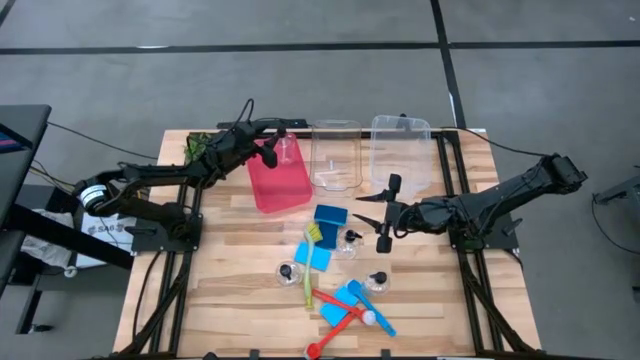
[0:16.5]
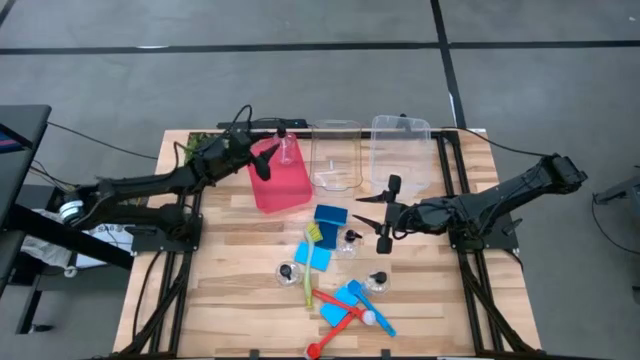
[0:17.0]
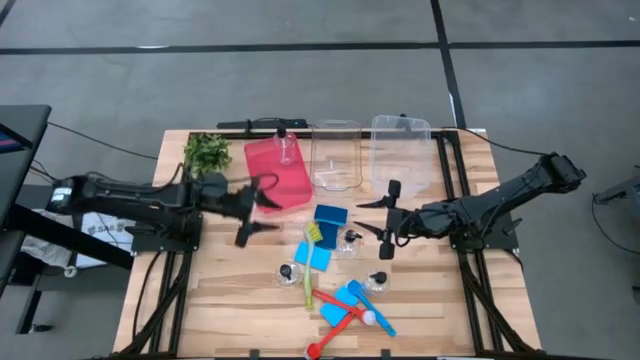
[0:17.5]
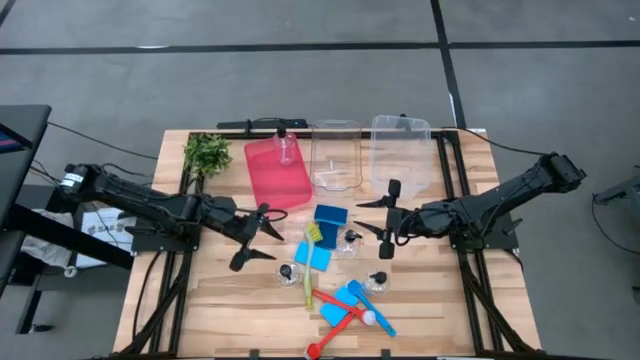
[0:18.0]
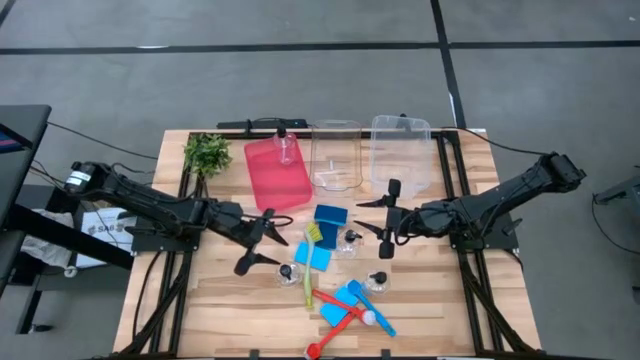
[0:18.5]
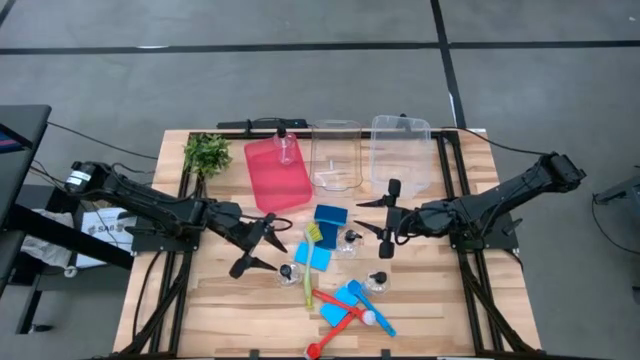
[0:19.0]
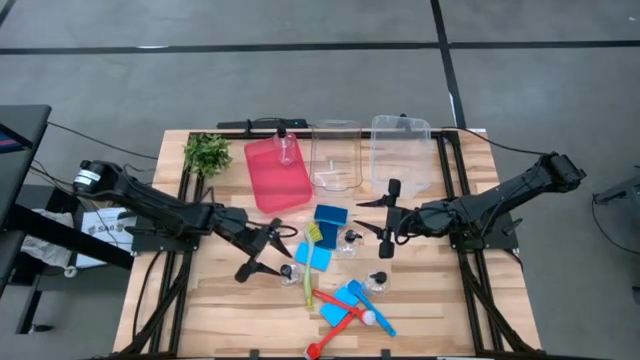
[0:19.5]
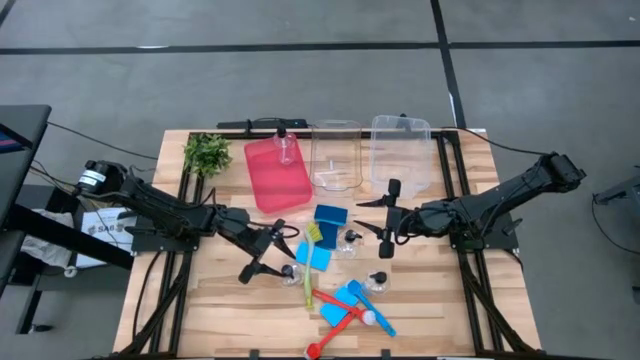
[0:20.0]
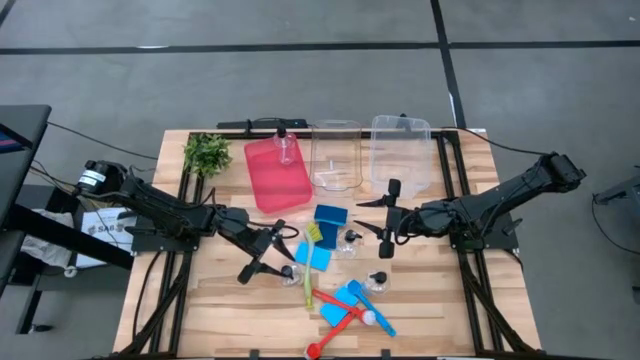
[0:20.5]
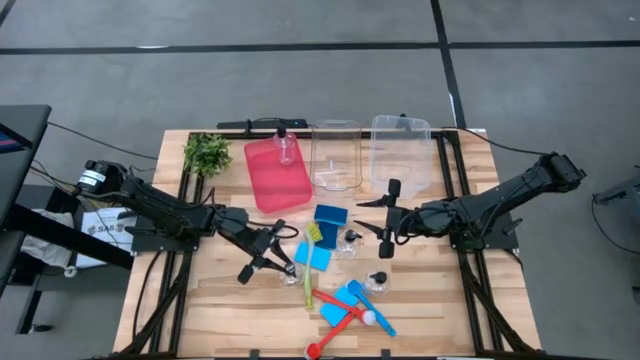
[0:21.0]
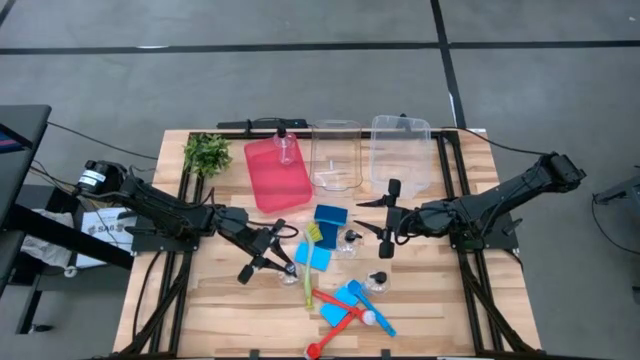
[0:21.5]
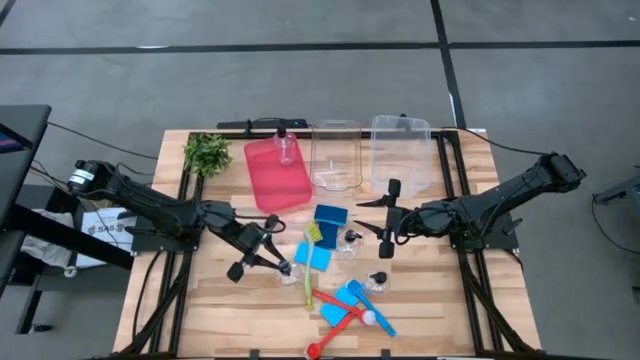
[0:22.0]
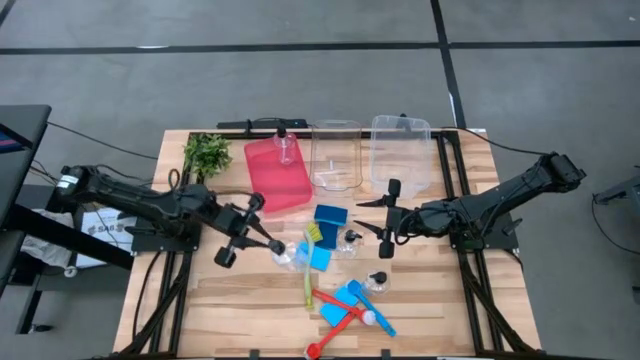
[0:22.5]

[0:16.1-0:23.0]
Task: Pick & Place Kitchen Sink Supplies
Put the transparent soap dispenser into the red bin

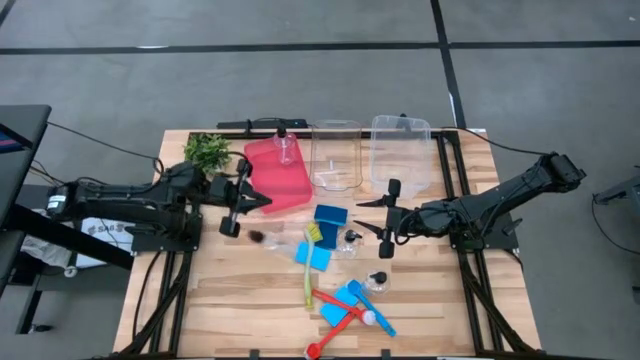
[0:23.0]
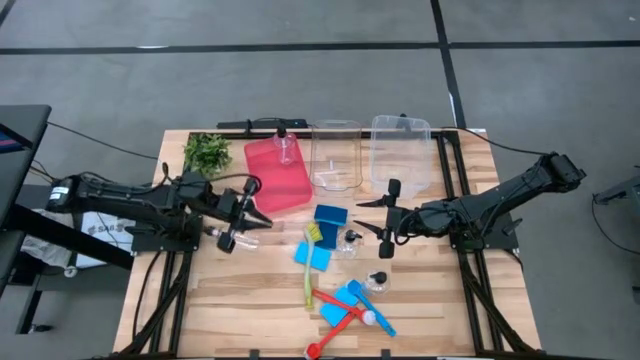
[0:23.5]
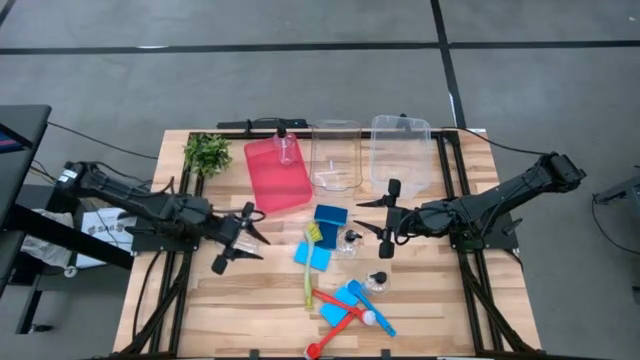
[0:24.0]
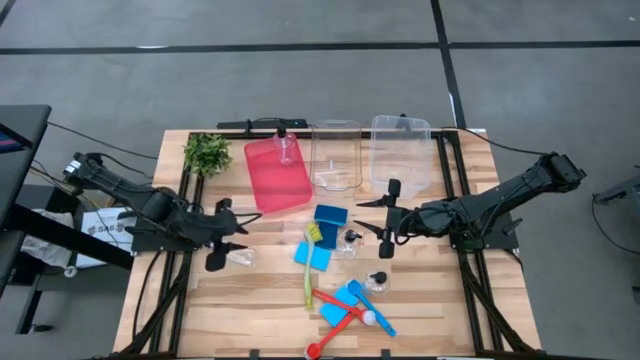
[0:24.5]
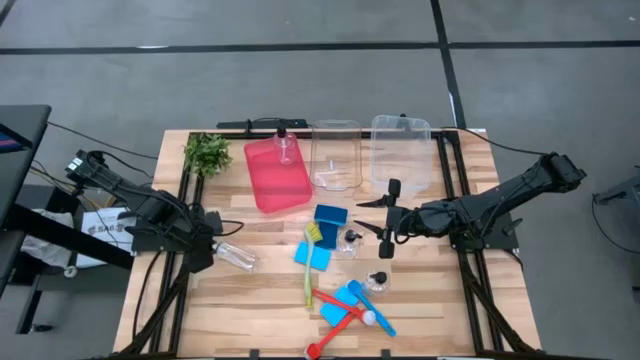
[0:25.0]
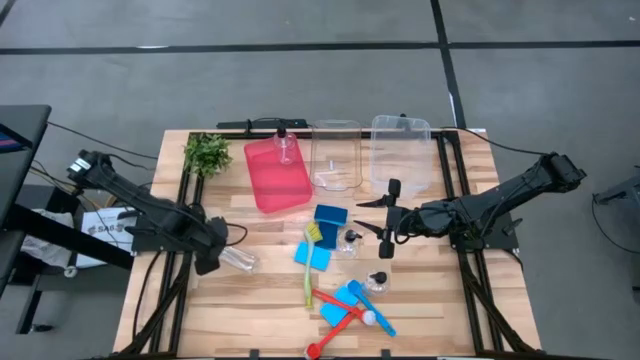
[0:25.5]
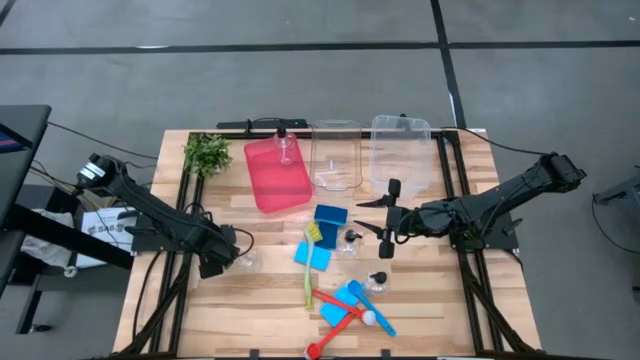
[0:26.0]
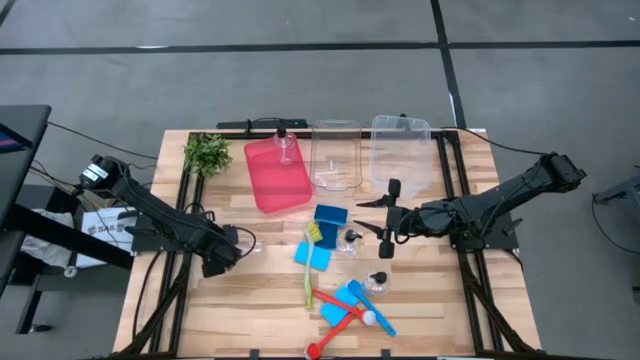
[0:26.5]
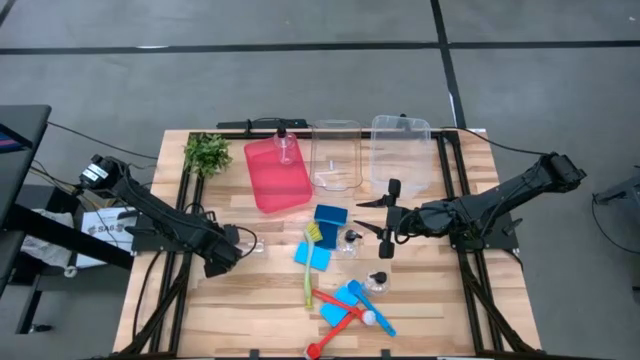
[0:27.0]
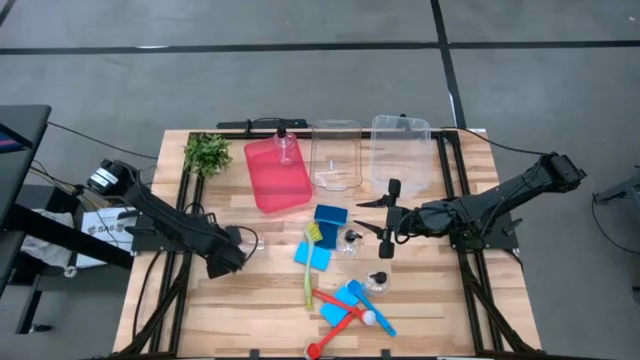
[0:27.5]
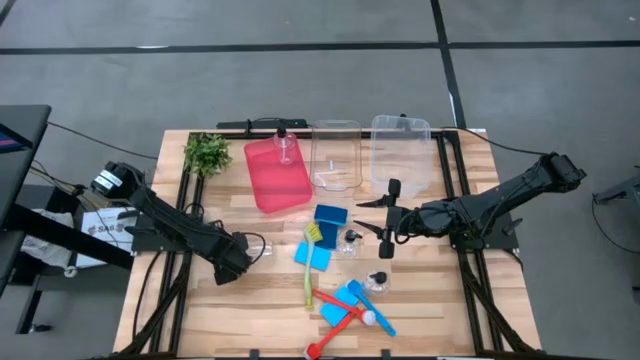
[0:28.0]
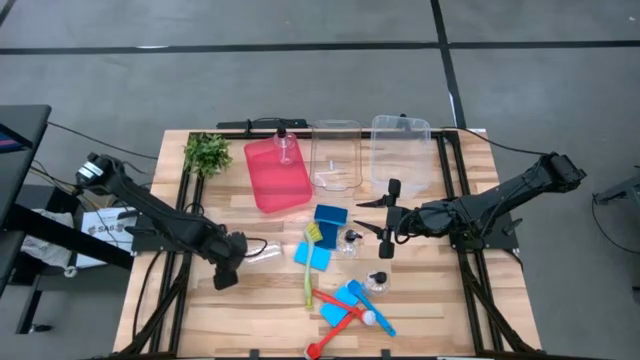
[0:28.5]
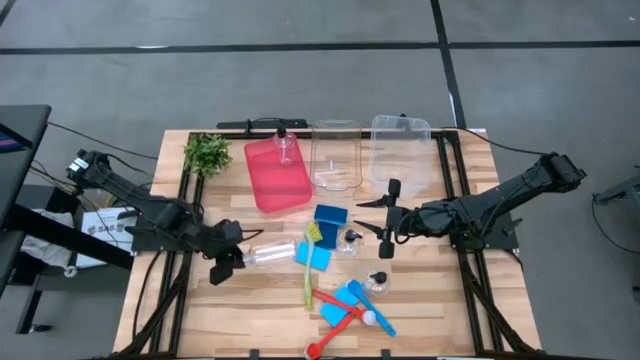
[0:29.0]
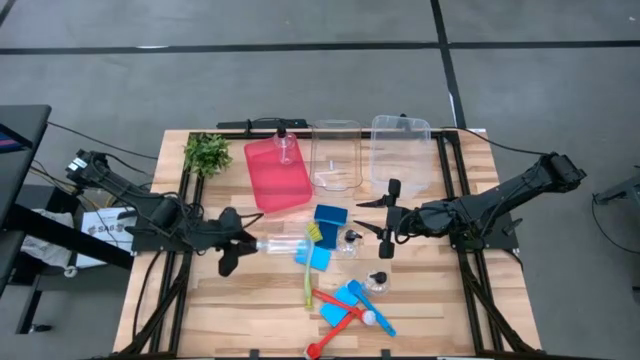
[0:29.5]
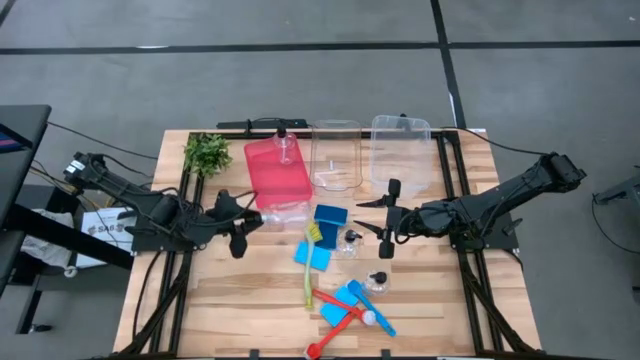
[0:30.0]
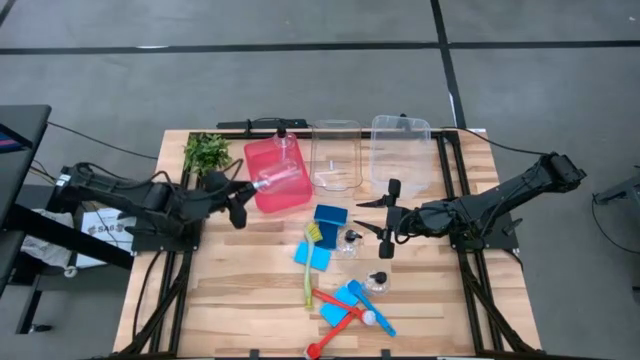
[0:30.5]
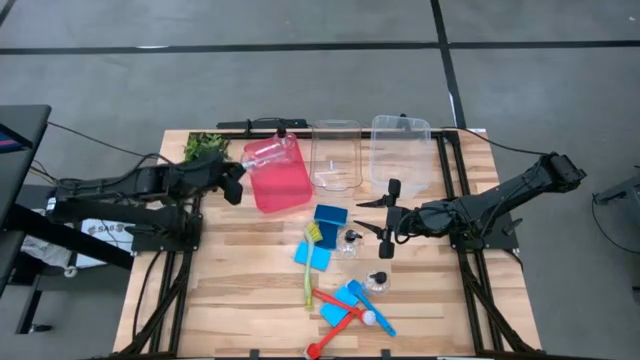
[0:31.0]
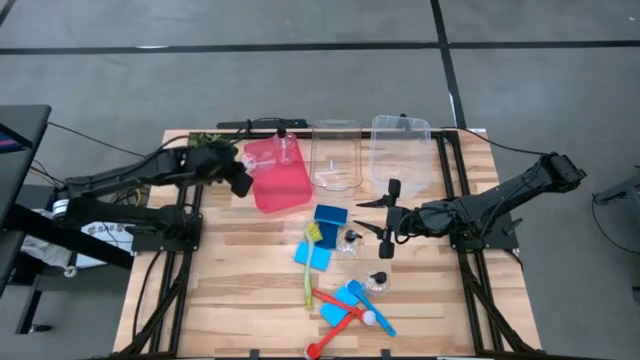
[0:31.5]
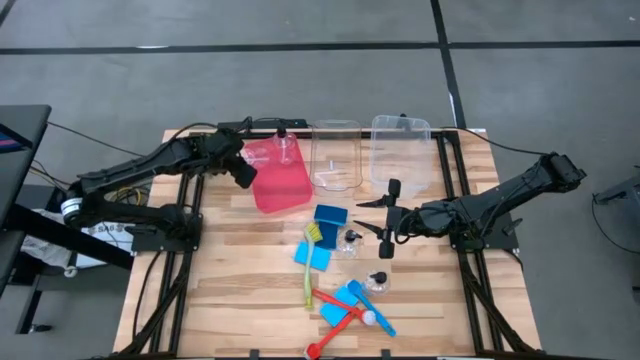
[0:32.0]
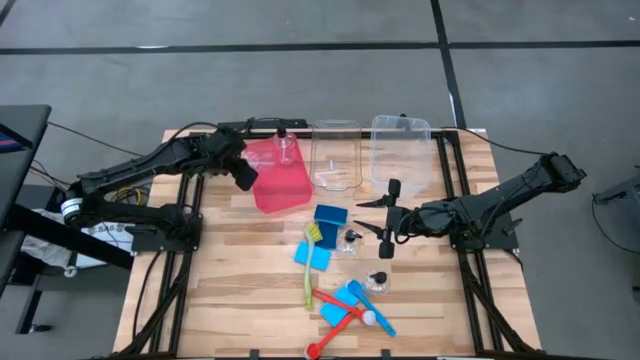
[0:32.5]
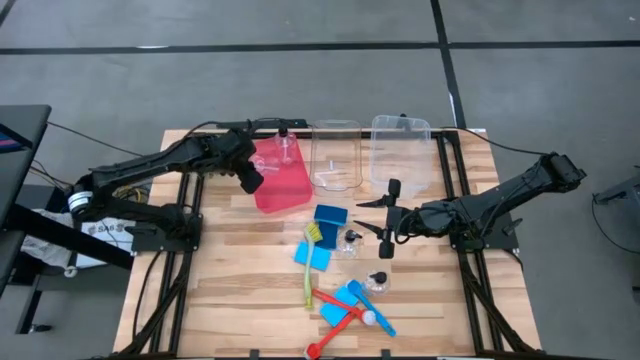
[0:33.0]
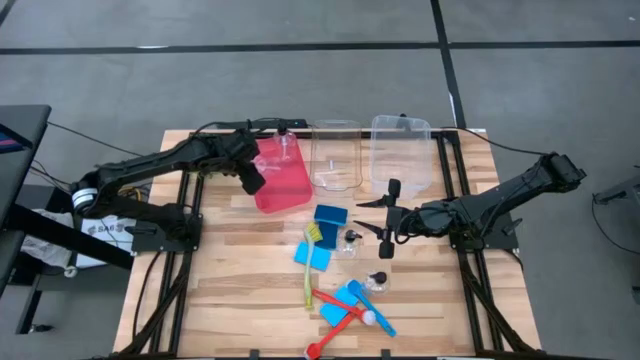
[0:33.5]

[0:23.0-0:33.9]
Put the transparent soap dispenser into the red bin

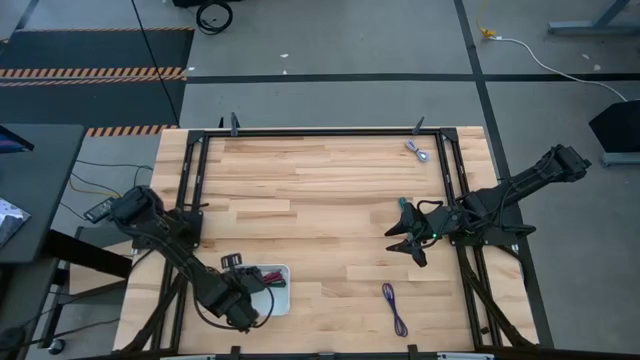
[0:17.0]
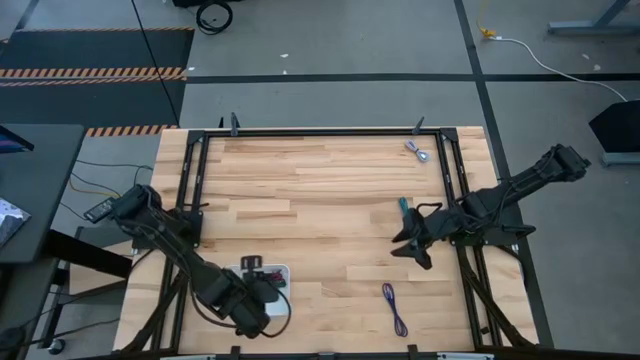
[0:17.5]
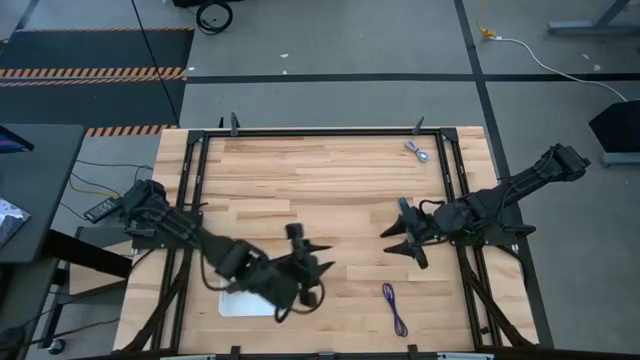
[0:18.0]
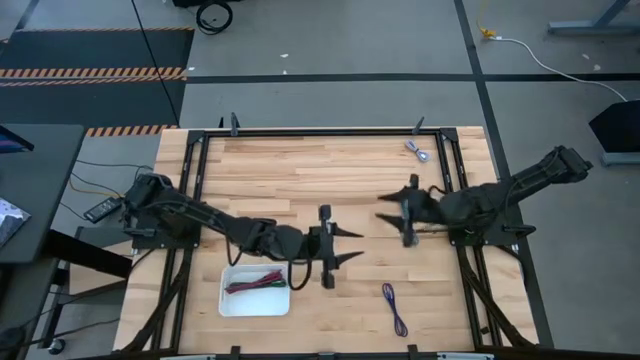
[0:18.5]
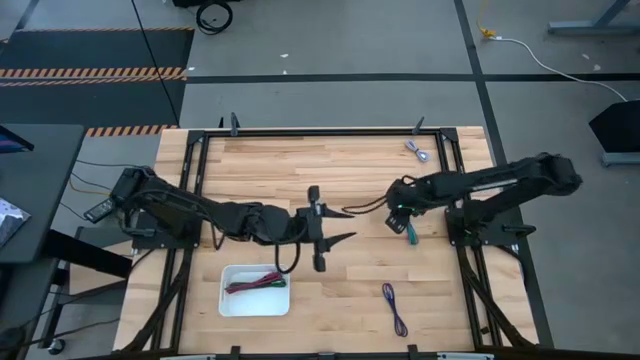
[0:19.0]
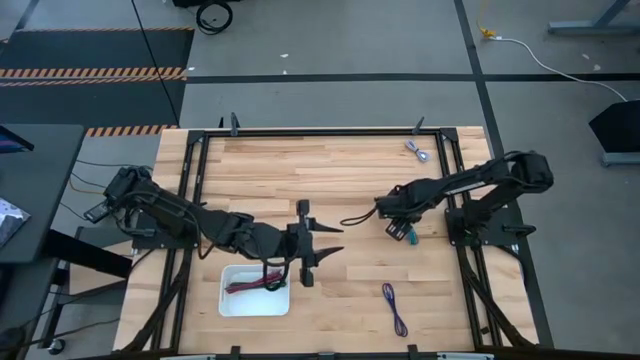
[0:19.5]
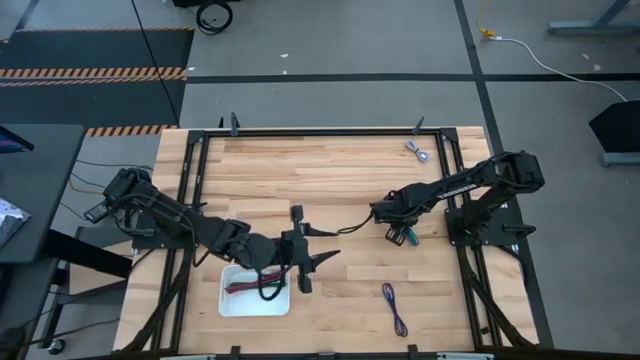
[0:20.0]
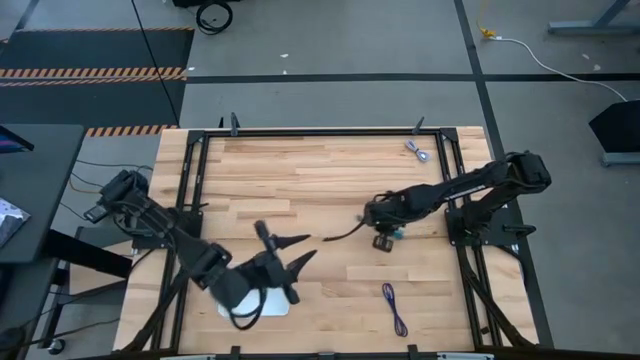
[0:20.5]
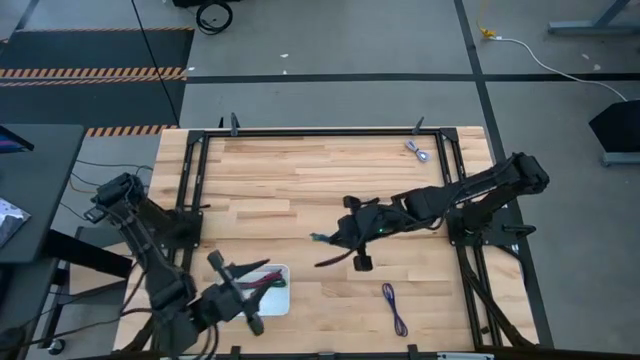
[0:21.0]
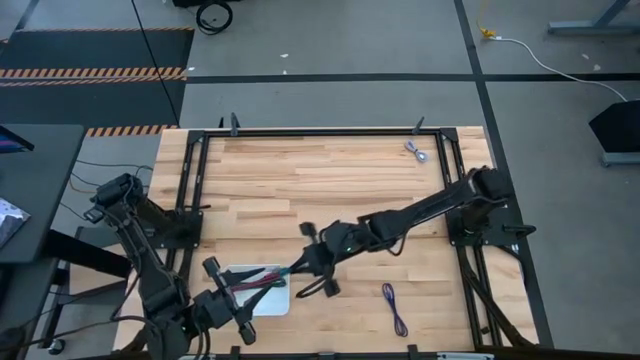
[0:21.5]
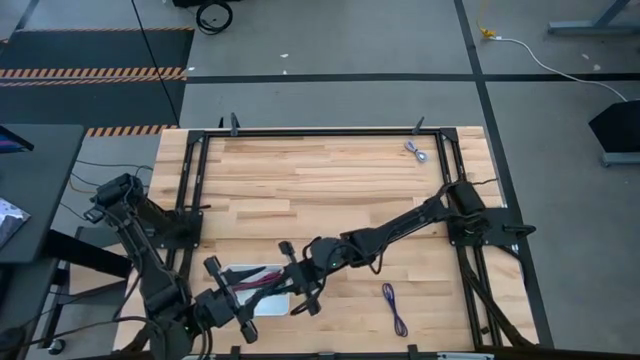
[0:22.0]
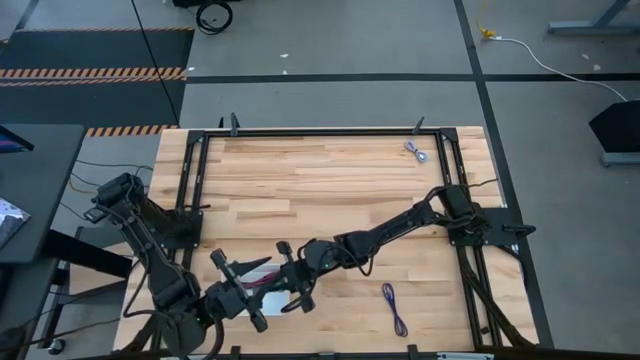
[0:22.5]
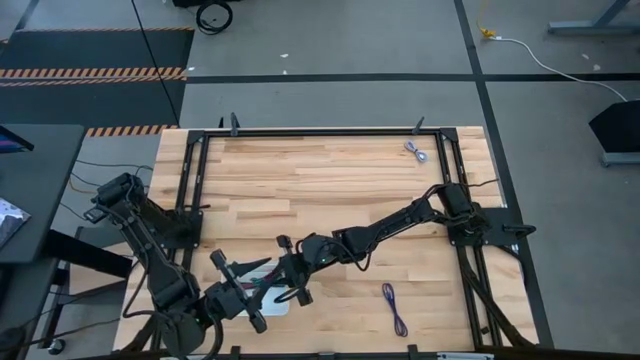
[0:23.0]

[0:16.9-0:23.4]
Task: Pick and place USB-C Cables
Put the light blue charger cable into the white bin
